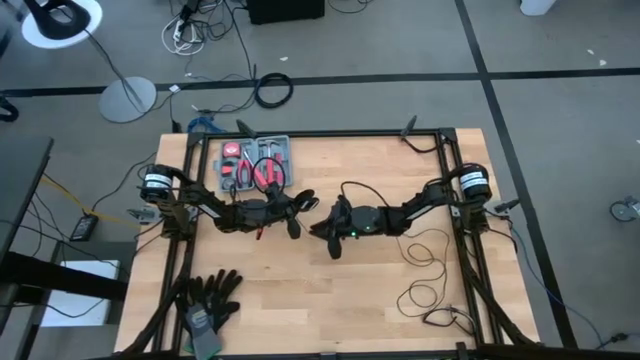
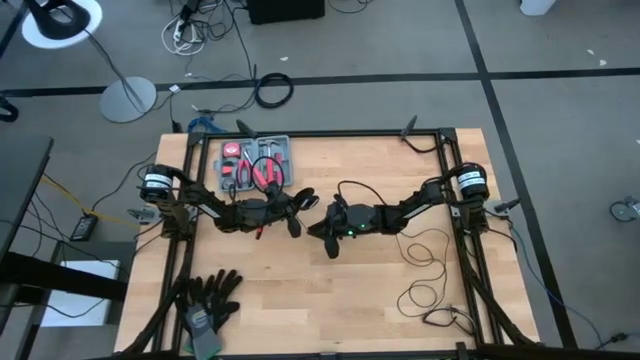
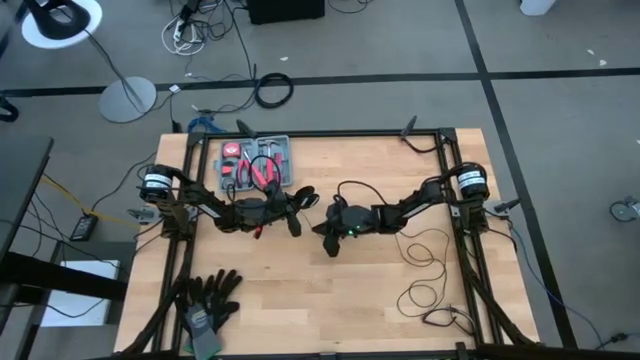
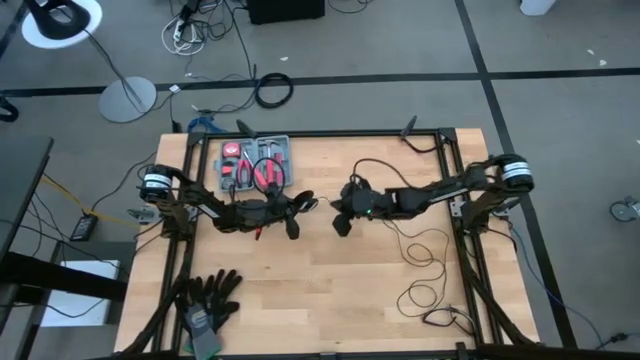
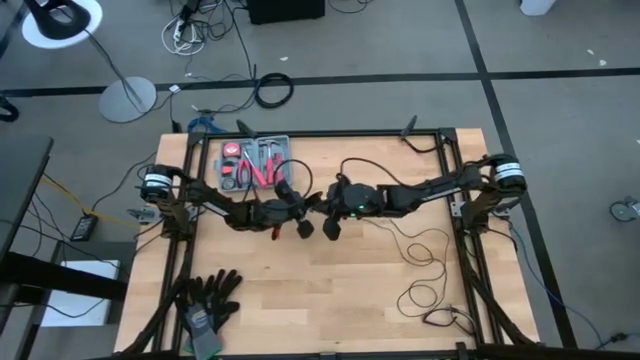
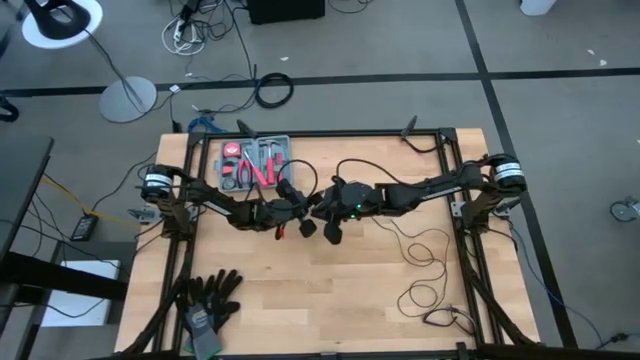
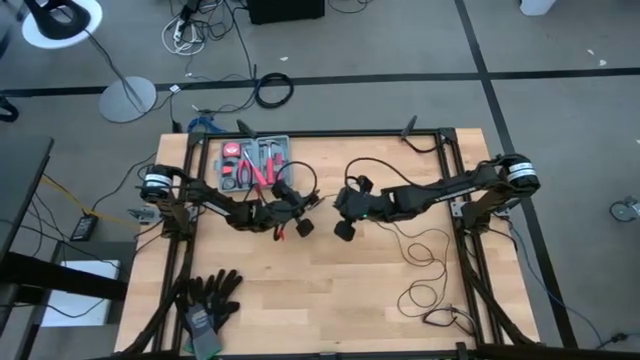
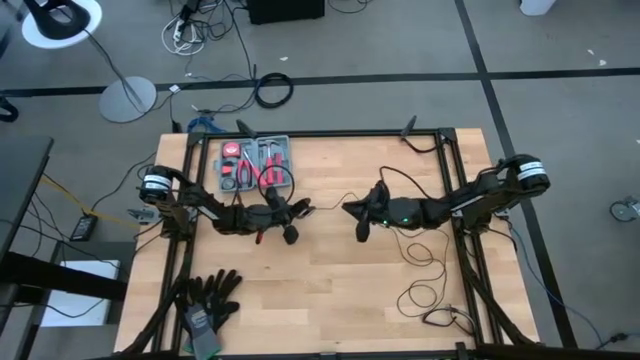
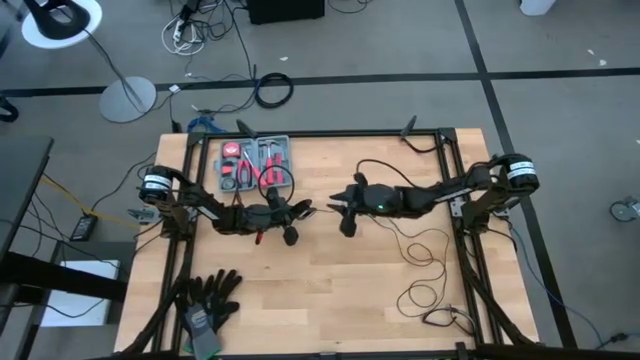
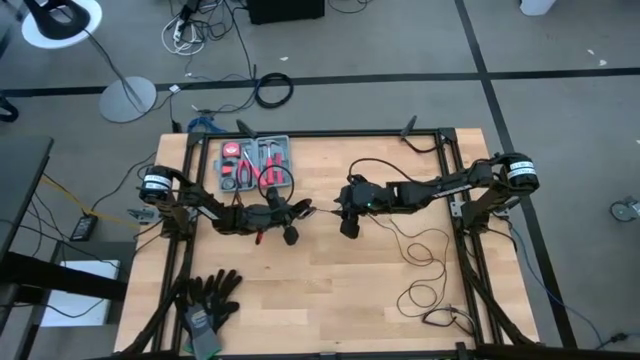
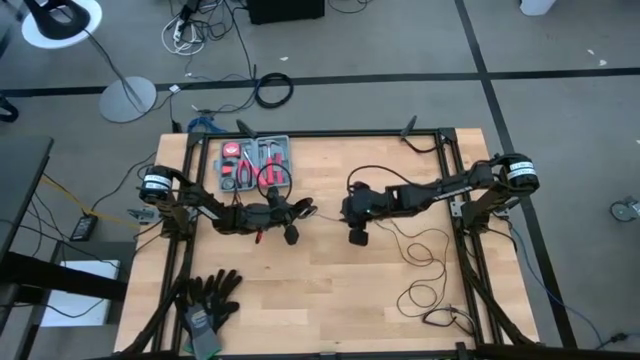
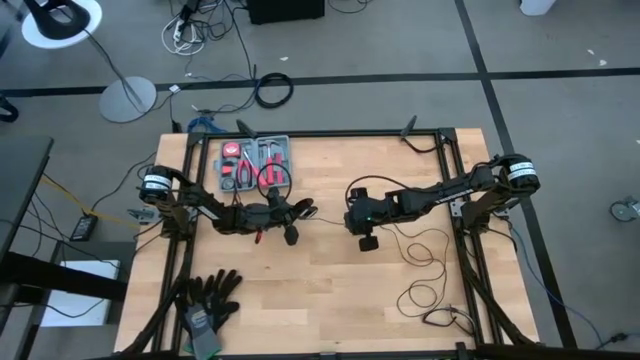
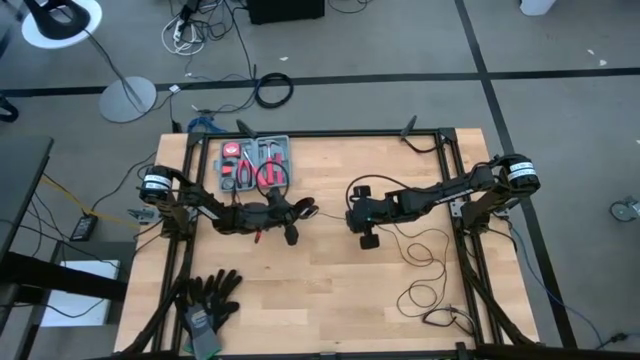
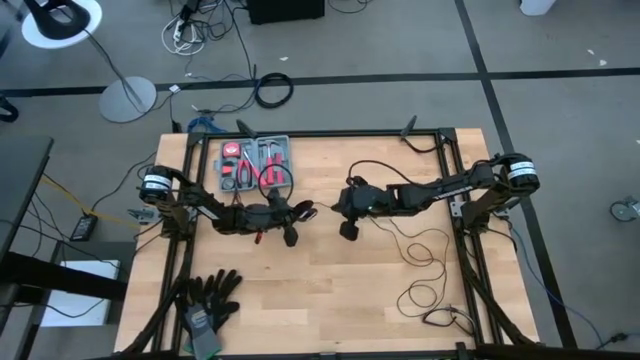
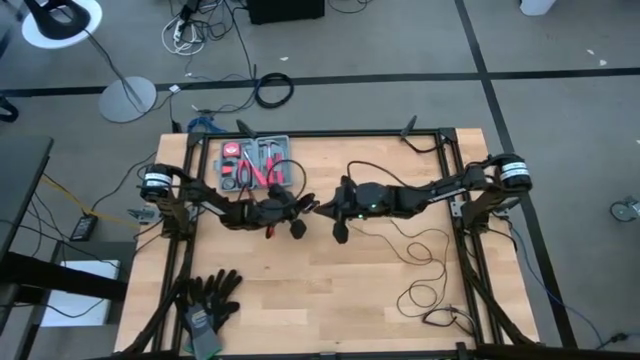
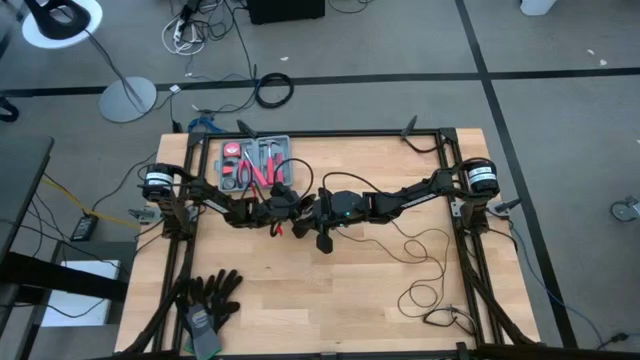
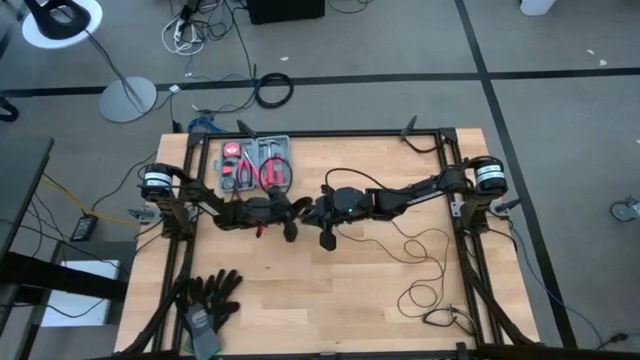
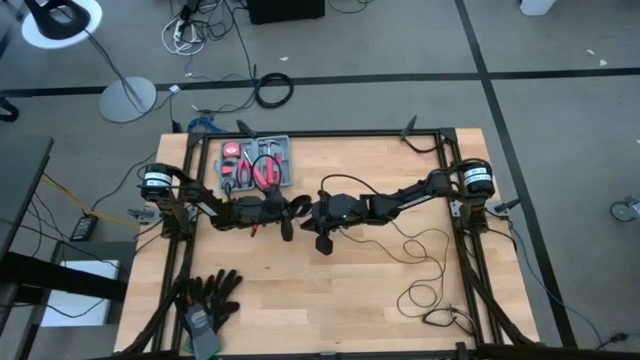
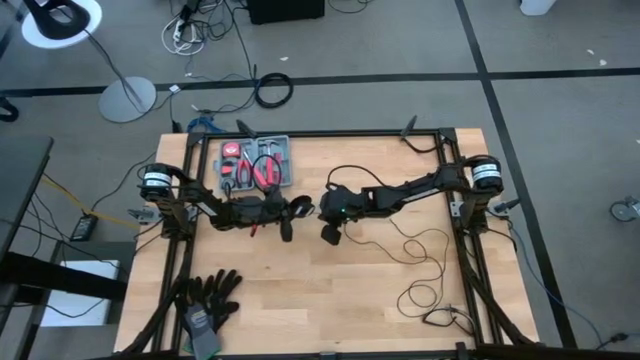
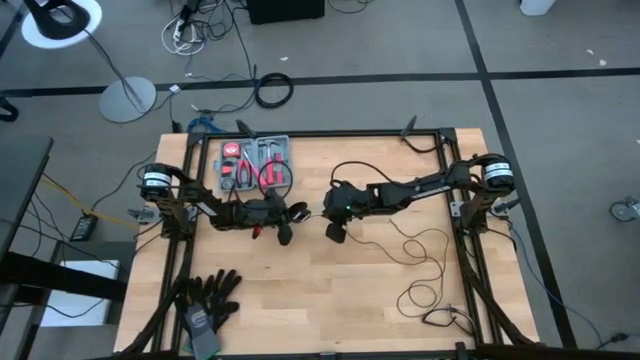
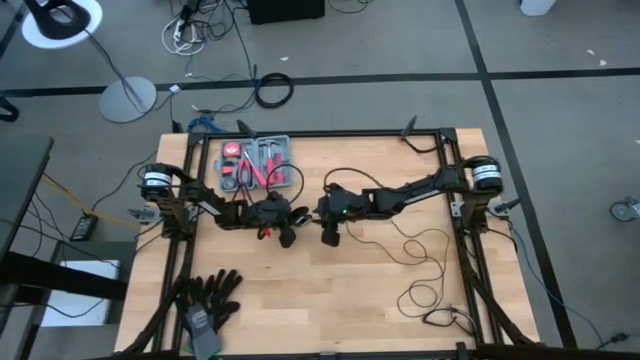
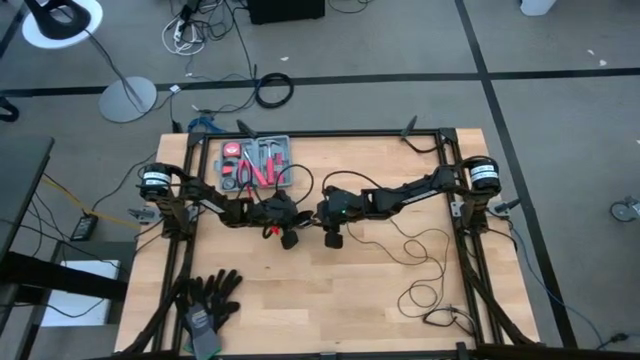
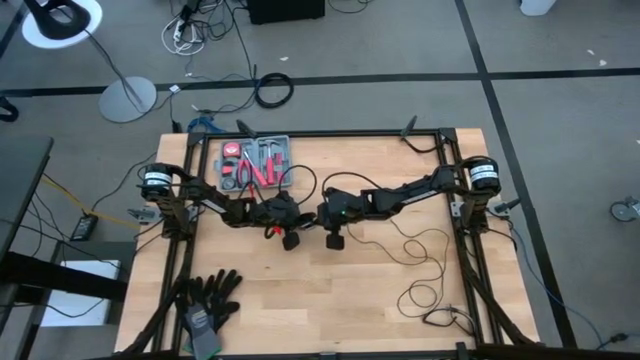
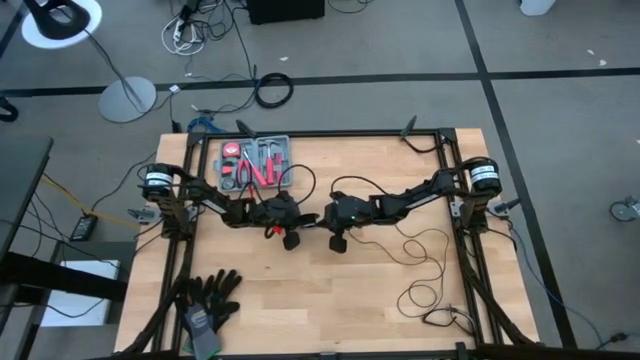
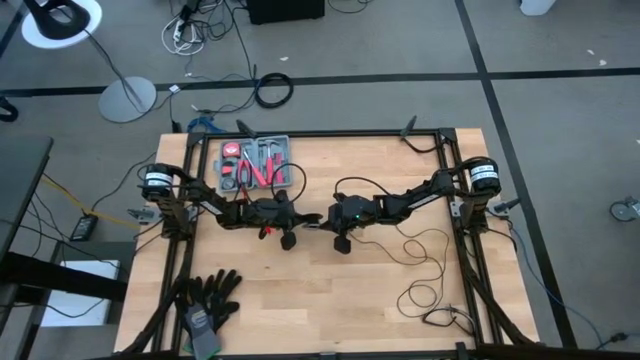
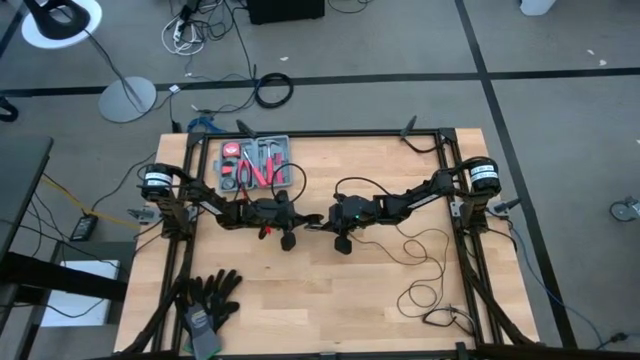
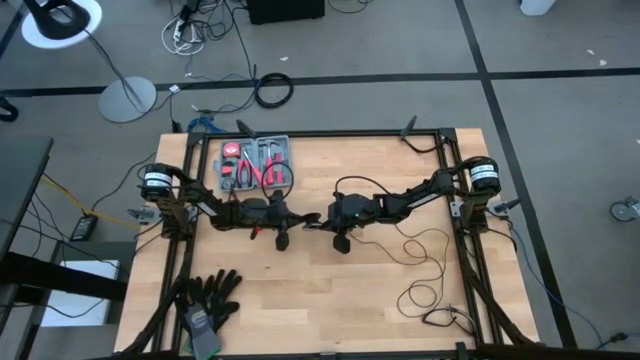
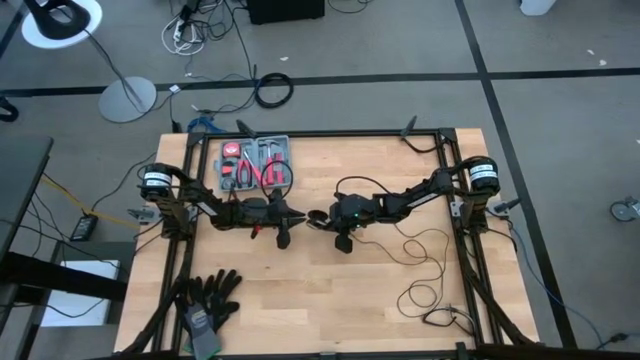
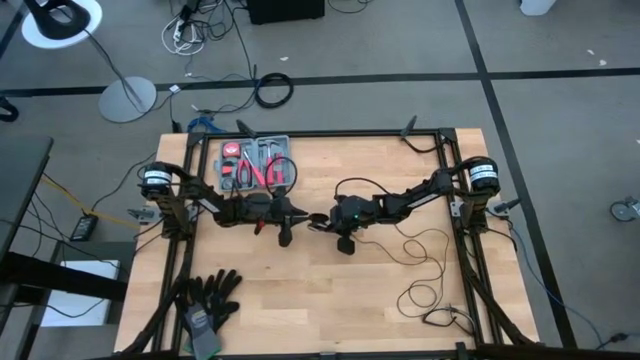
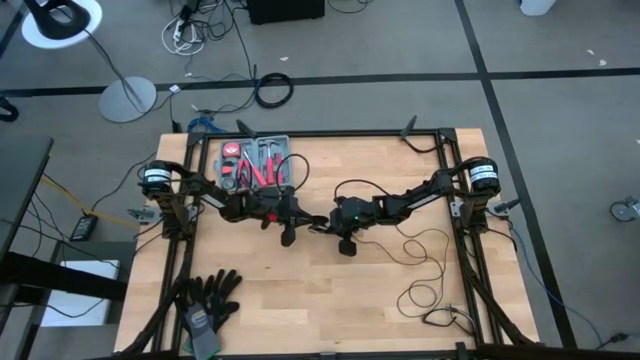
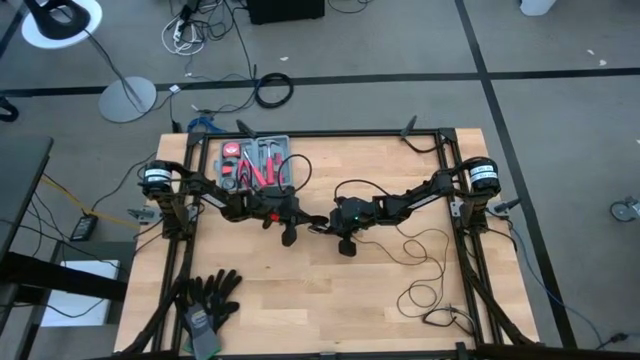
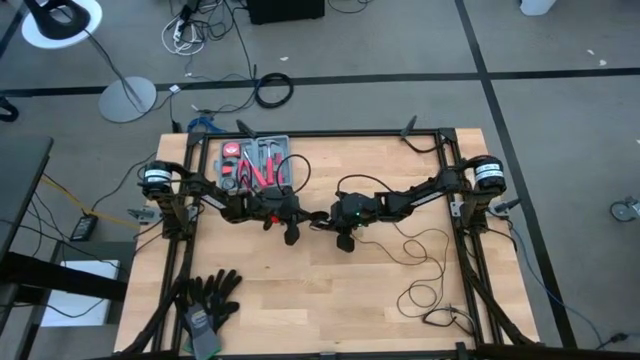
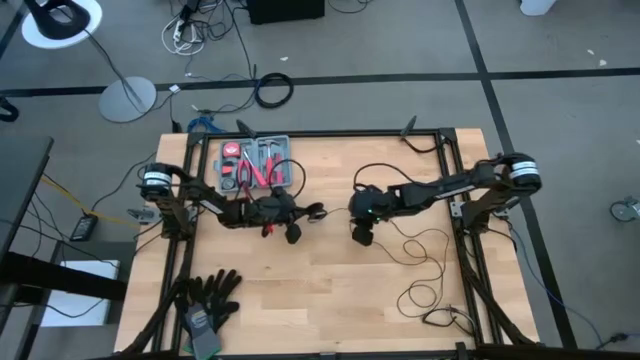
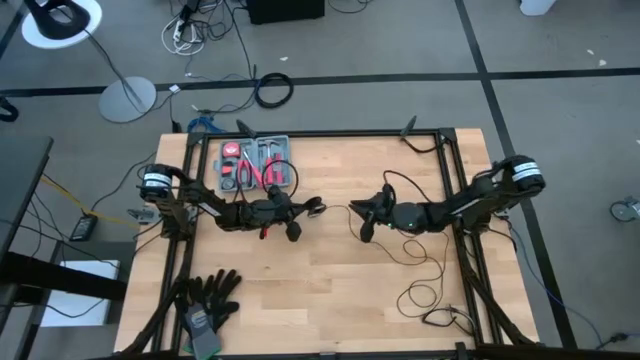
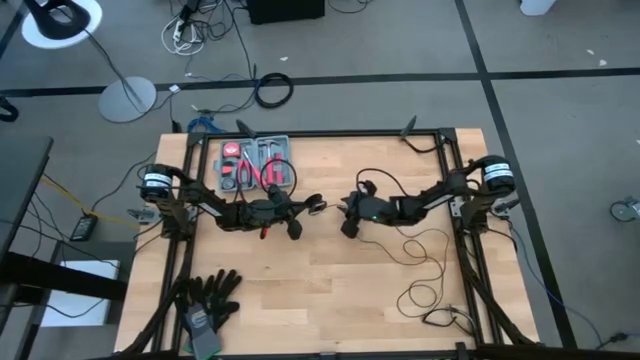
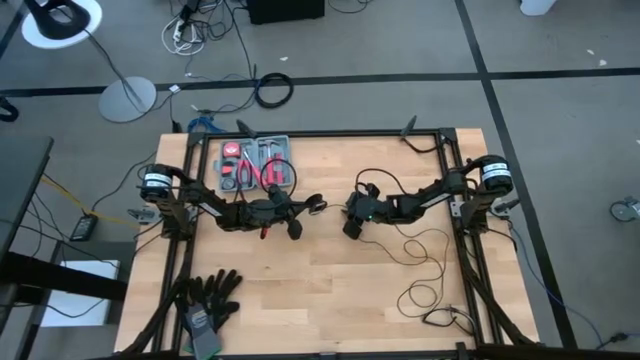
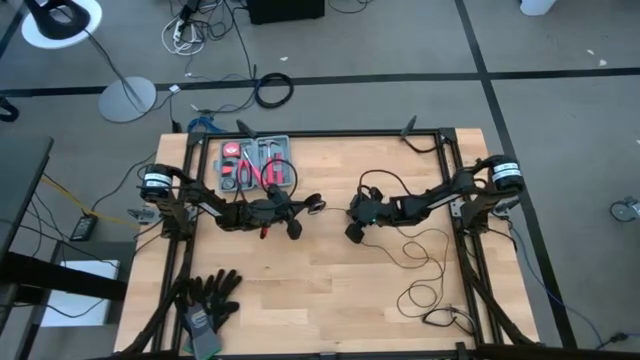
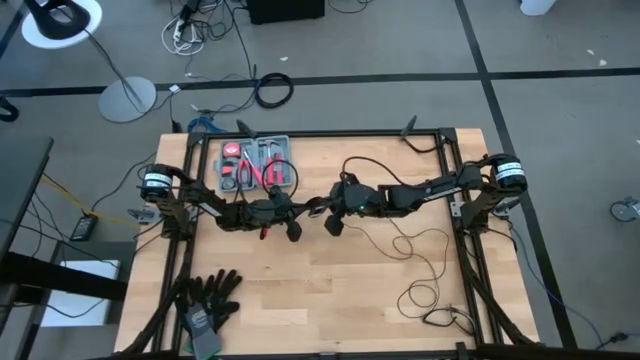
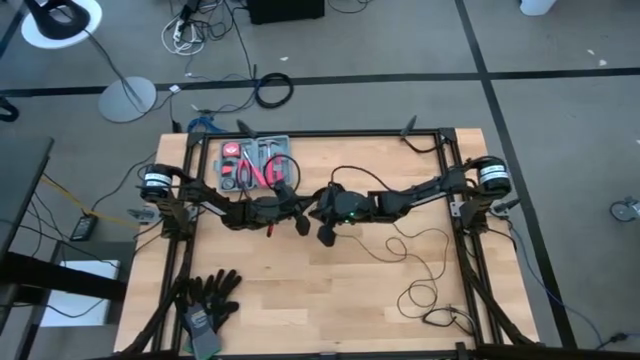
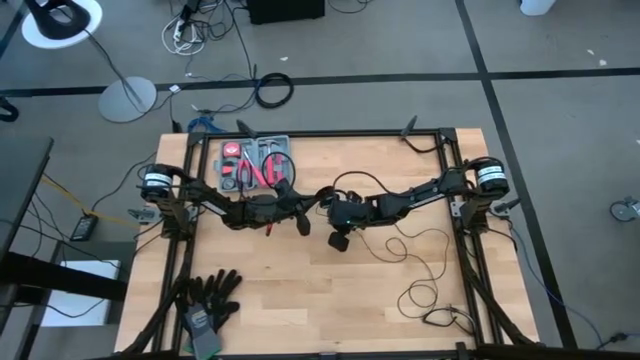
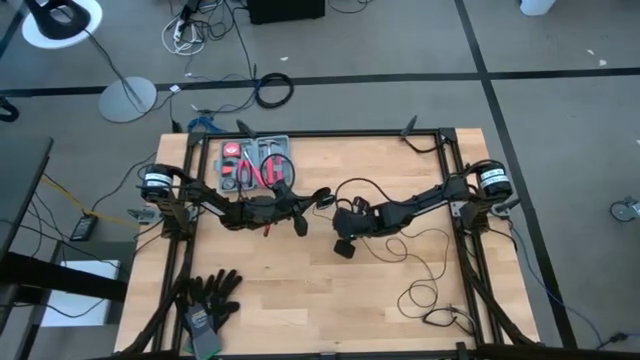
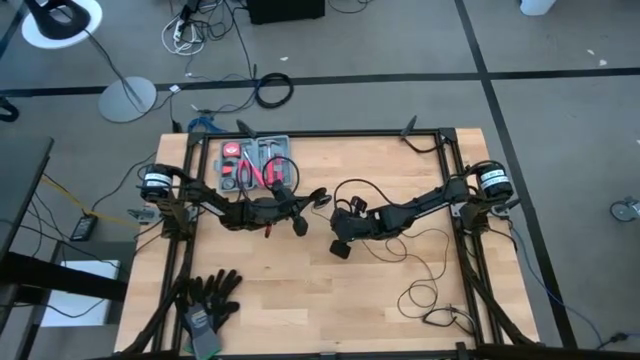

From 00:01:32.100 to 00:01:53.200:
Task: Coil cords
Coil the black cable wire on the spool
